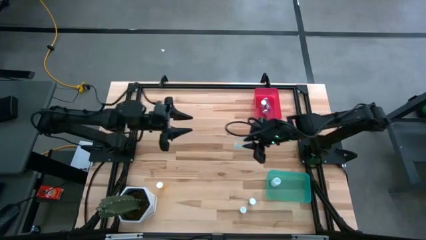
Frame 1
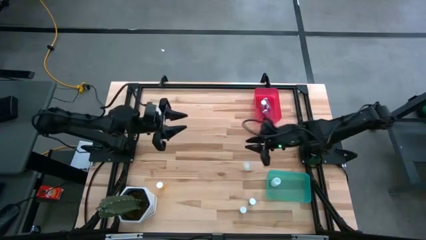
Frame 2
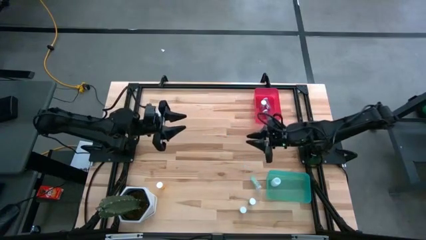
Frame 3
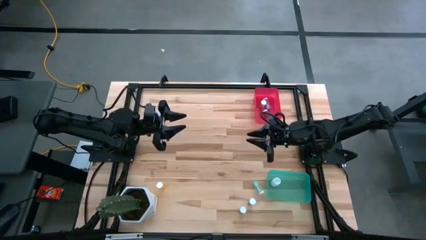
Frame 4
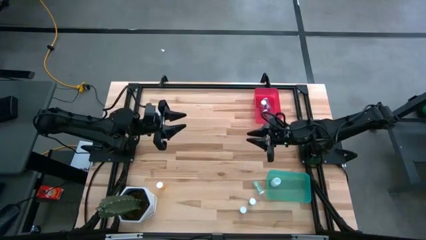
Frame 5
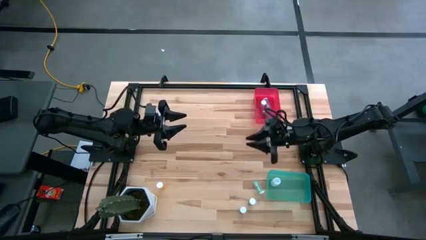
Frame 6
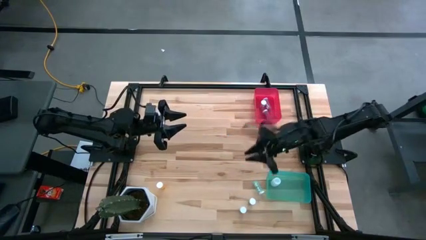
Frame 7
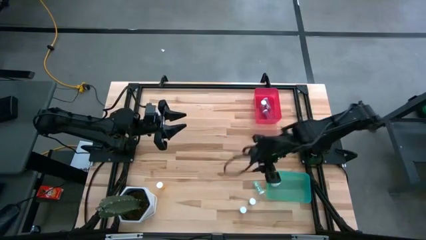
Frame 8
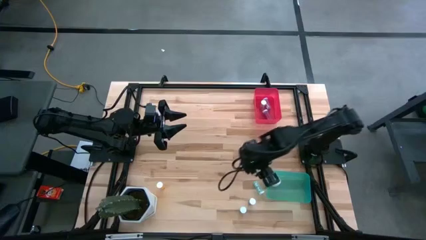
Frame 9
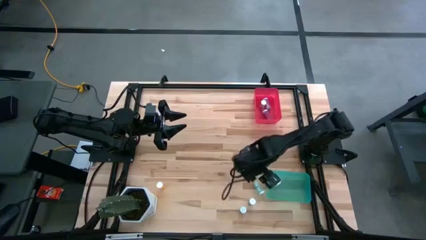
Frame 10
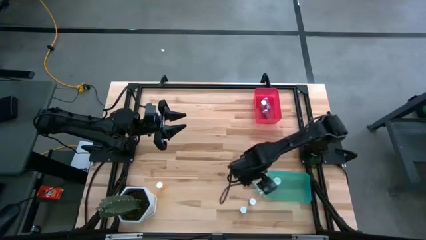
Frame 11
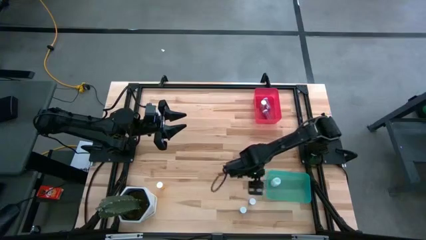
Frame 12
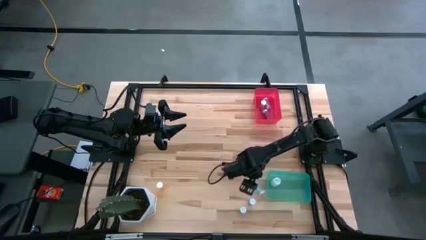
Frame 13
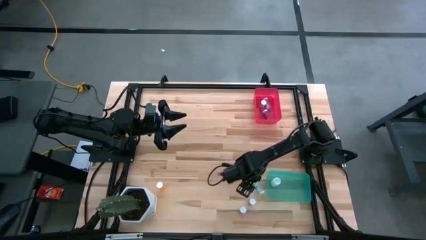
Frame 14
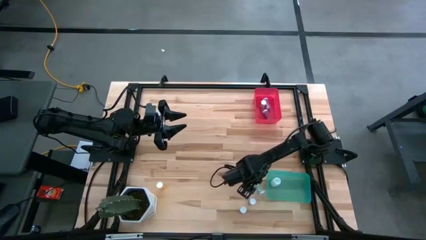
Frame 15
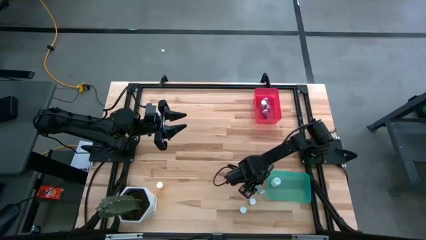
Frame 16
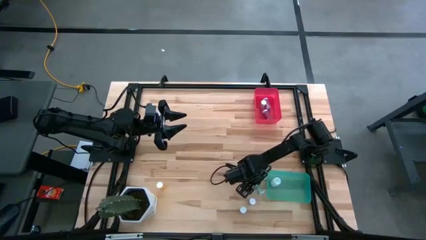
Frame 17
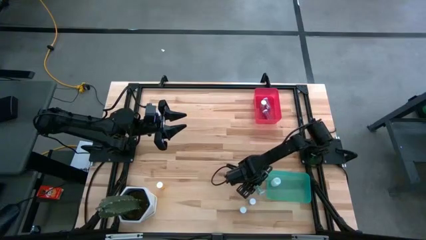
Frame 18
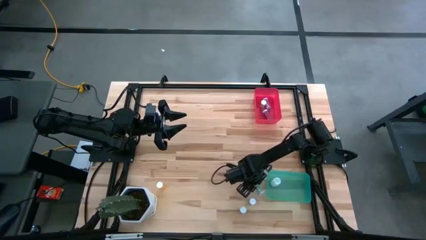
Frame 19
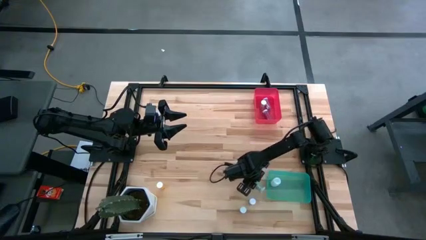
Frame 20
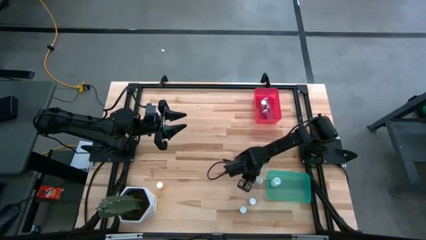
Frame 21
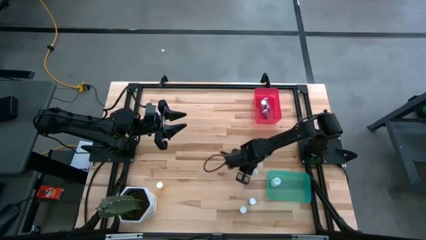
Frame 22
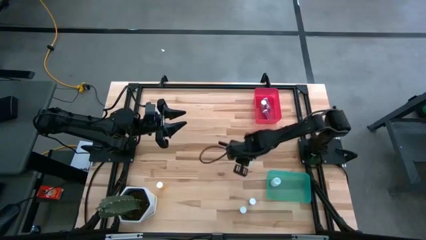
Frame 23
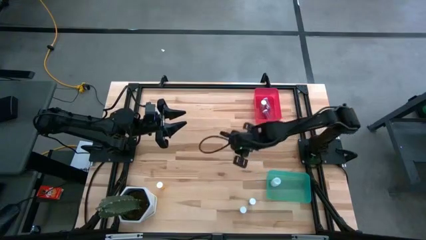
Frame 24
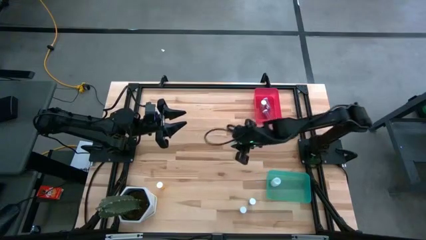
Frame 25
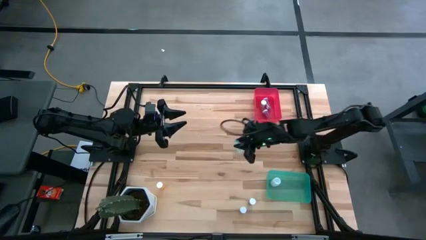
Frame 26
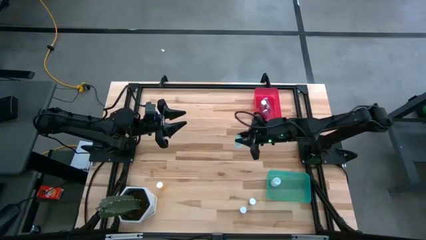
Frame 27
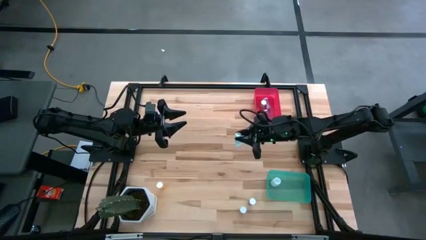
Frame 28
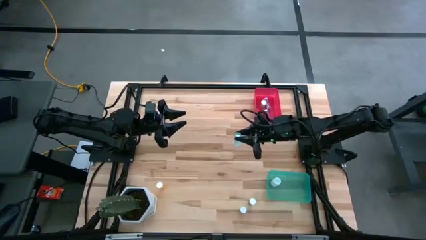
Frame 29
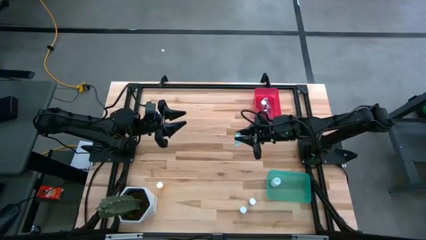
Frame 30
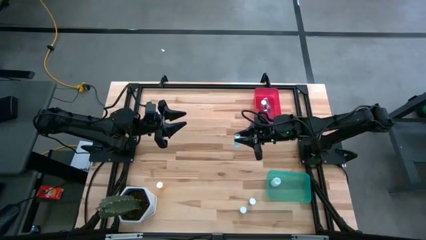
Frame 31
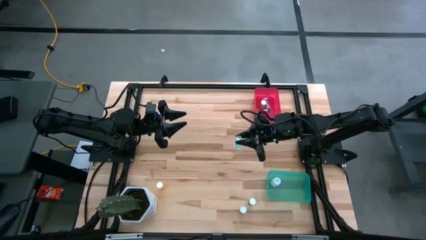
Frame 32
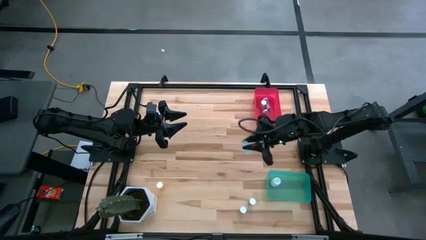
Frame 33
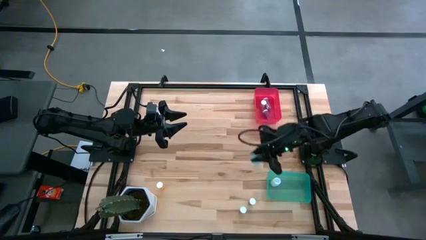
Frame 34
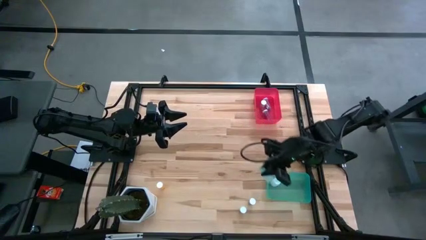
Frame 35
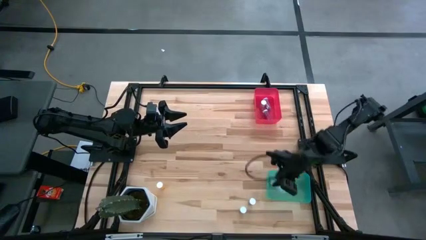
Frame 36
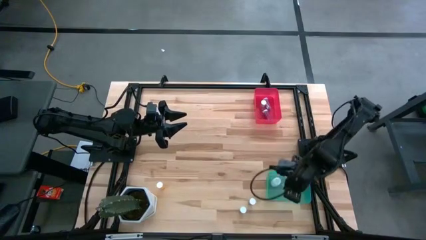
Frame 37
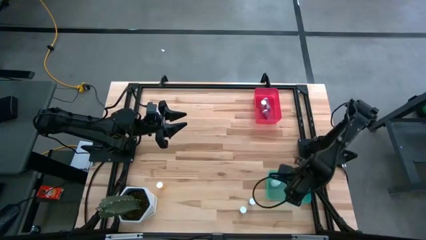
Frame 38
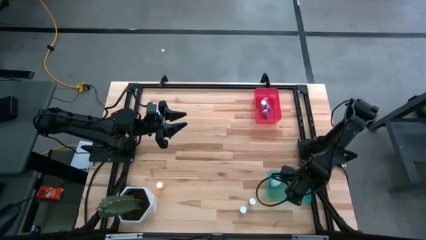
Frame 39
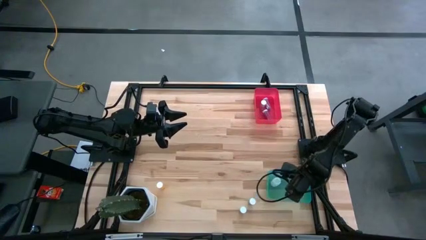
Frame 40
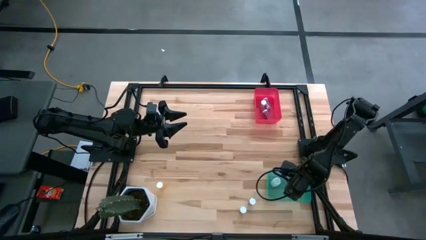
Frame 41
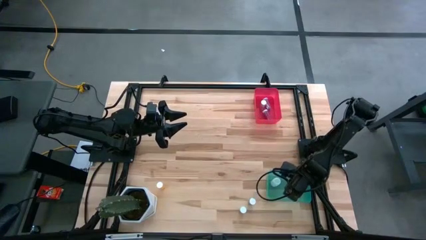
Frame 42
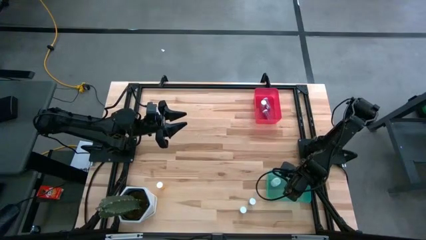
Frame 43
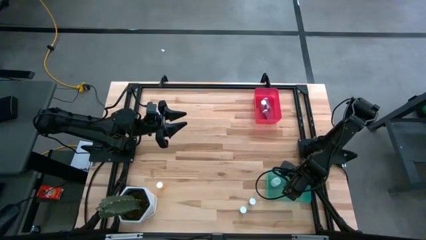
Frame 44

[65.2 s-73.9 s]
Task: Pick and place medicine bottles into bin by pill shape (circle, oval)
Put the green tablet bottle into the green bin

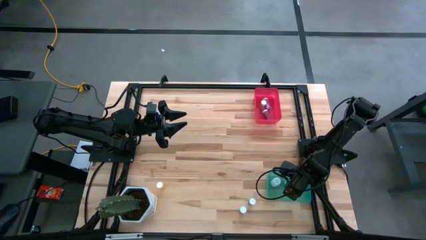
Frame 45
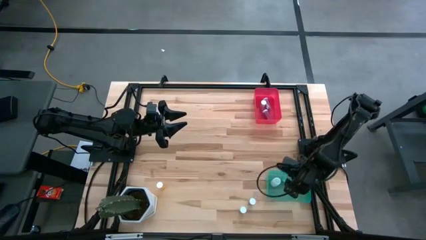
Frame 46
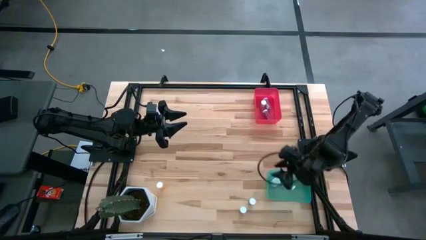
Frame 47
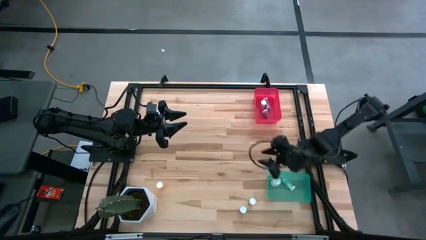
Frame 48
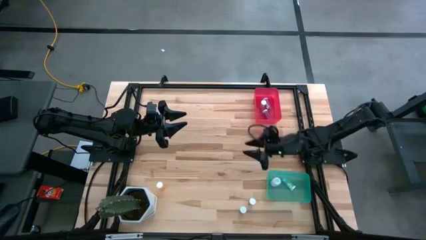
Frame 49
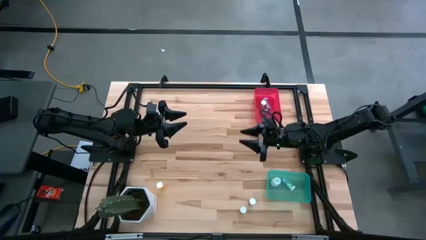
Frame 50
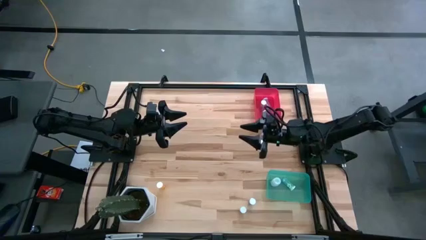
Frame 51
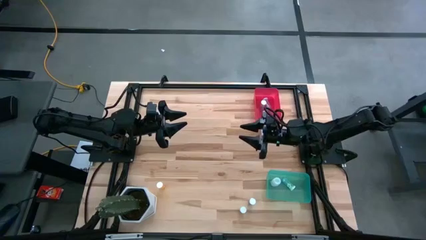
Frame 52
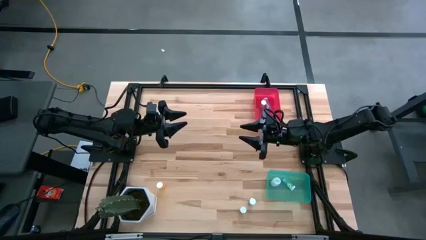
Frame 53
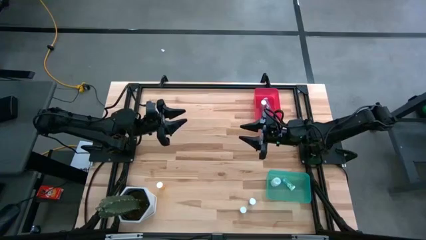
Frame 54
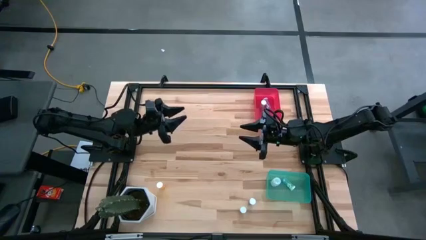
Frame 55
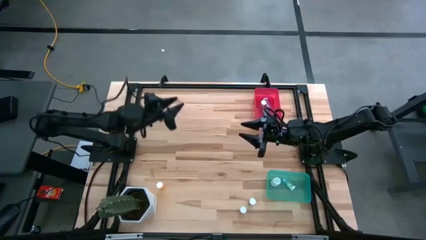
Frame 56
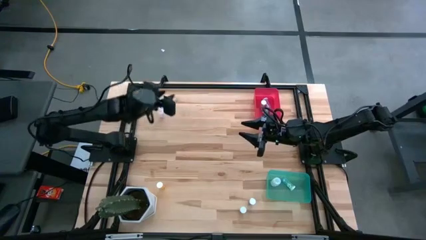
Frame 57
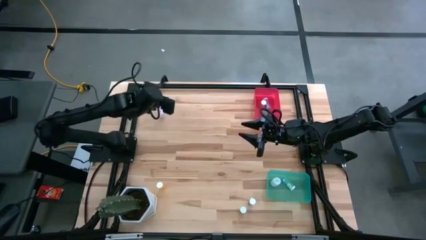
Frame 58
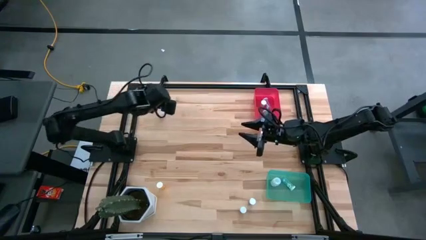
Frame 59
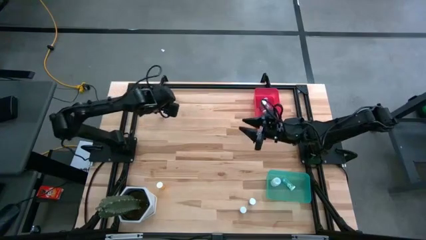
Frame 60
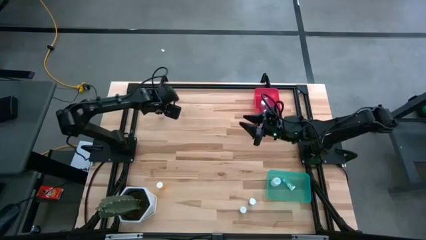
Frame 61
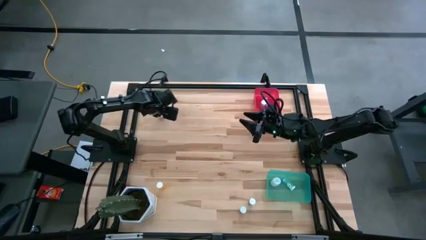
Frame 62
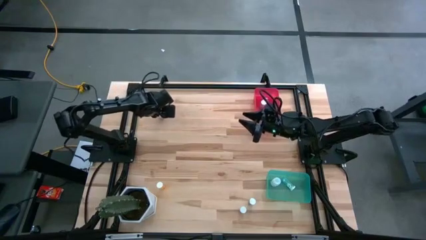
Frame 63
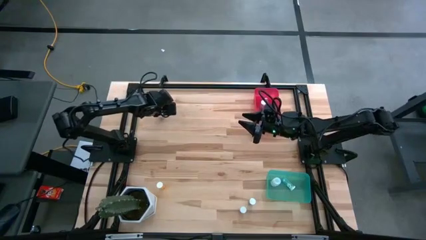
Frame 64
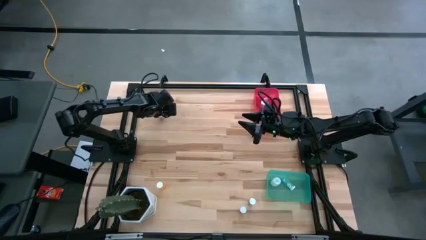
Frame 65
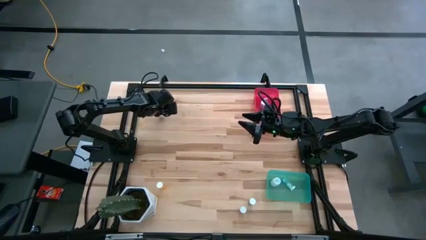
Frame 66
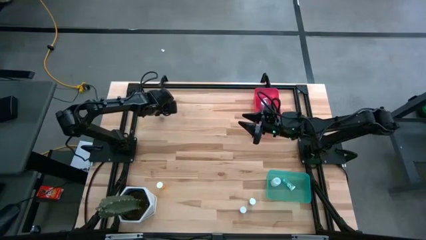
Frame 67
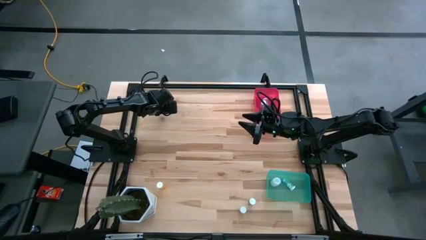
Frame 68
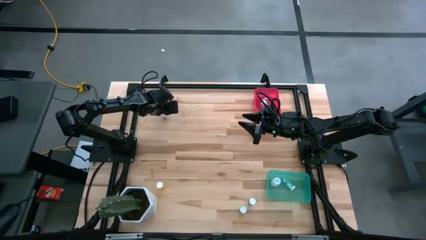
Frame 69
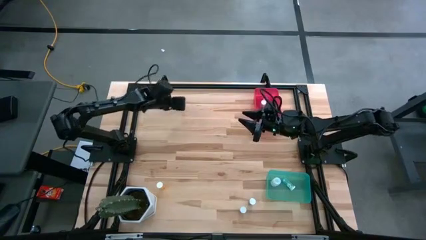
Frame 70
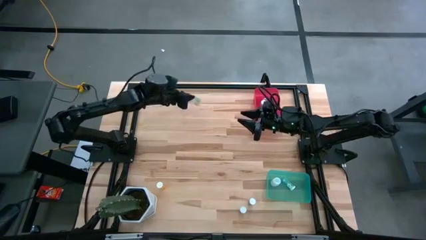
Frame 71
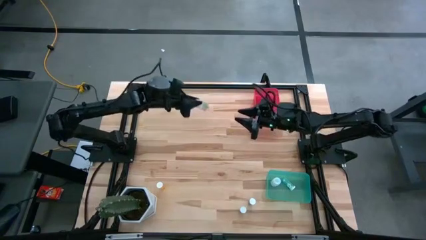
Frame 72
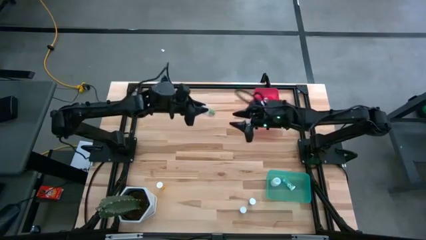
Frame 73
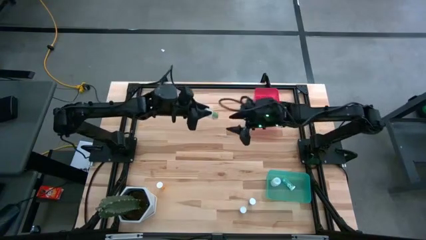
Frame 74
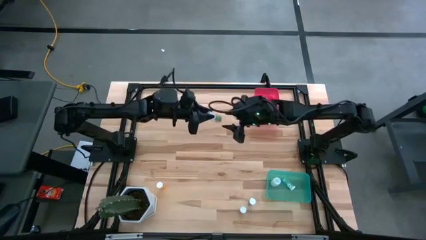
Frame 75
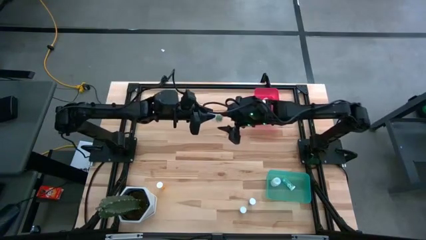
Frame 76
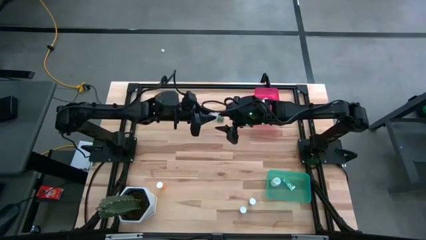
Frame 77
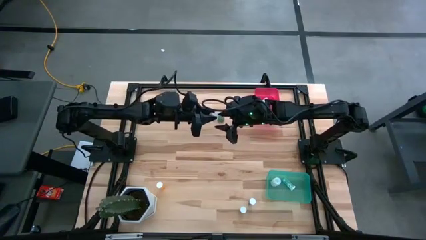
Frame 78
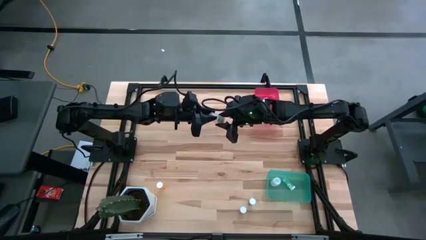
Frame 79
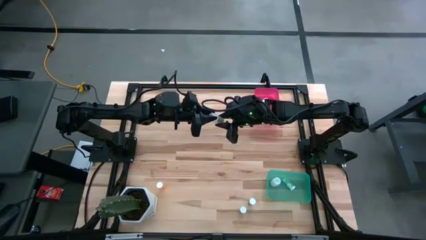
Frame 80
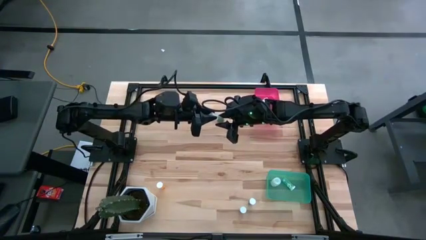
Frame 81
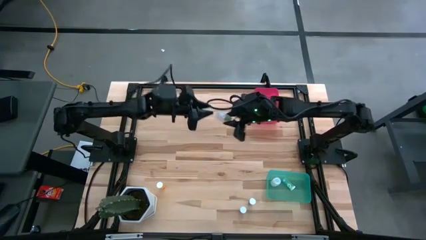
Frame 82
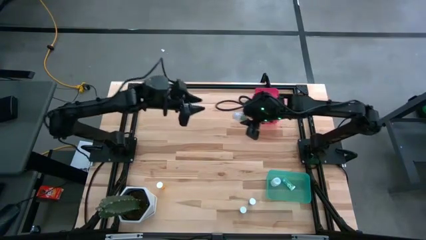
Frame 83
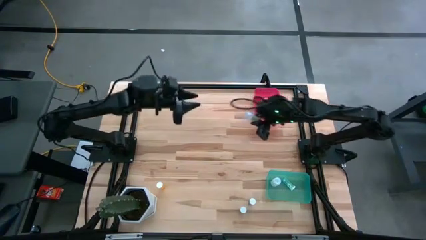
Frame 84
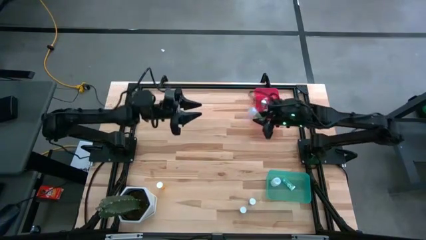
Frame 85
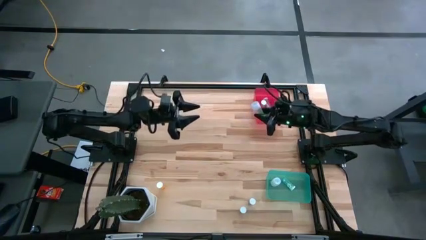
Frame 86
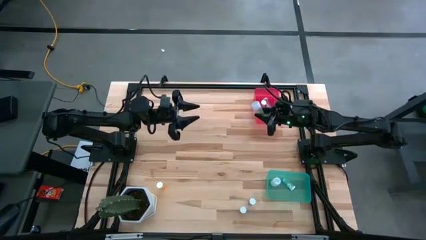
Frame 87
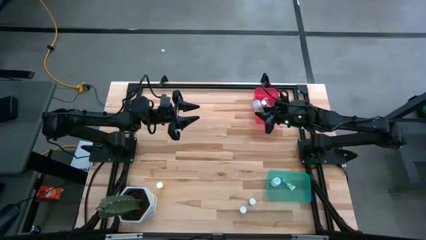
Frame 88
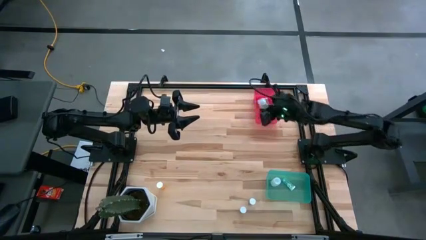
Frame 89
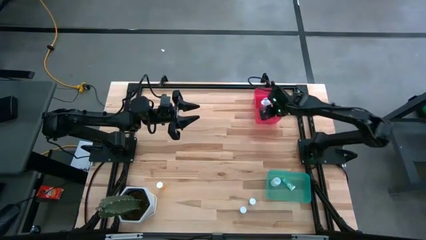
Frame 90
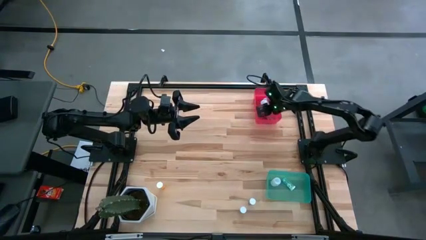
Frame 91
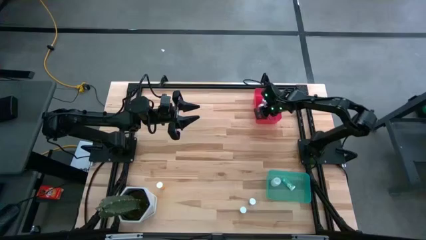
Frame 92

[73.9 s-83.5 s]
Put the white capsule bottle into the red bin
